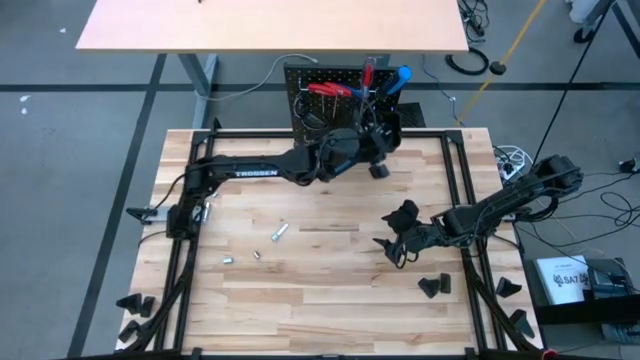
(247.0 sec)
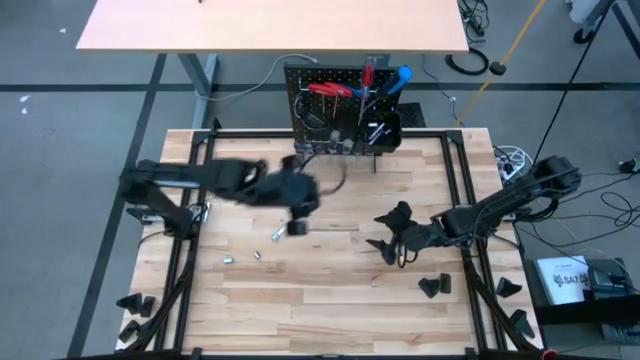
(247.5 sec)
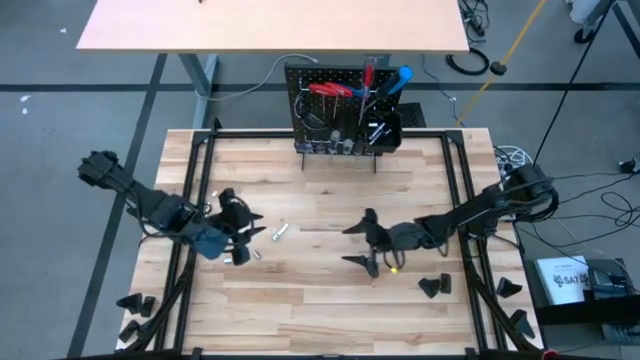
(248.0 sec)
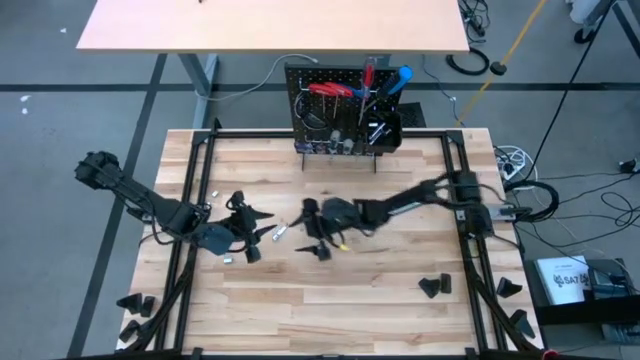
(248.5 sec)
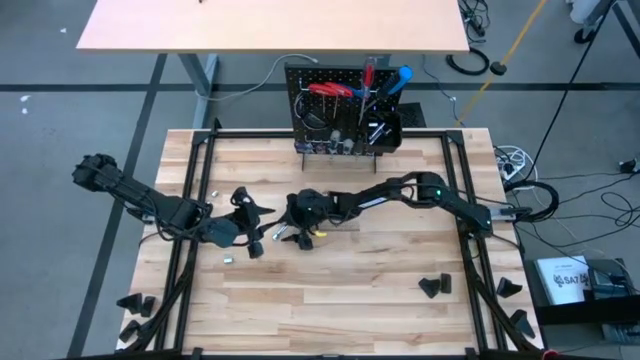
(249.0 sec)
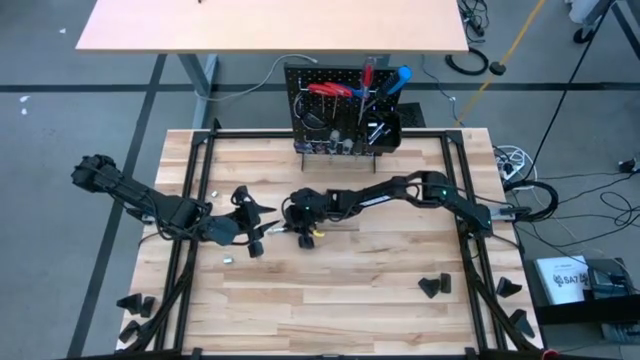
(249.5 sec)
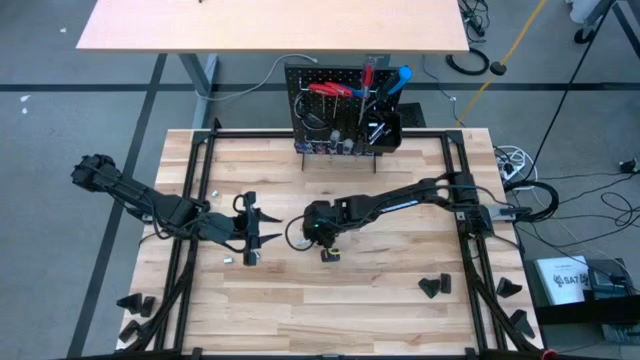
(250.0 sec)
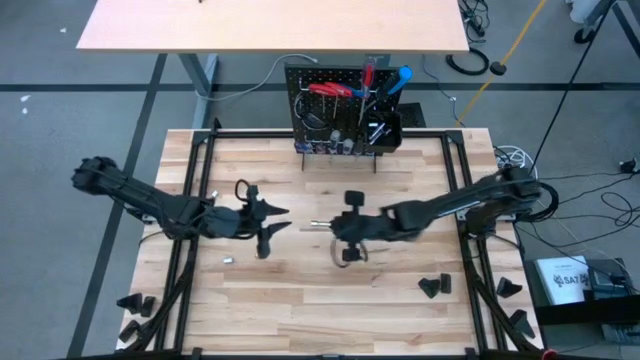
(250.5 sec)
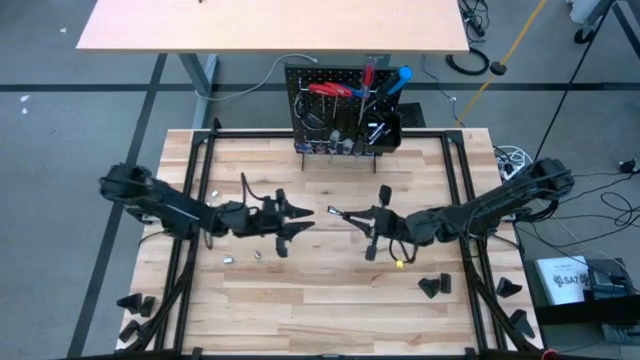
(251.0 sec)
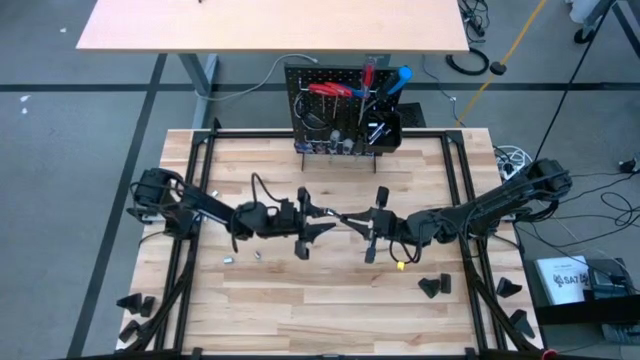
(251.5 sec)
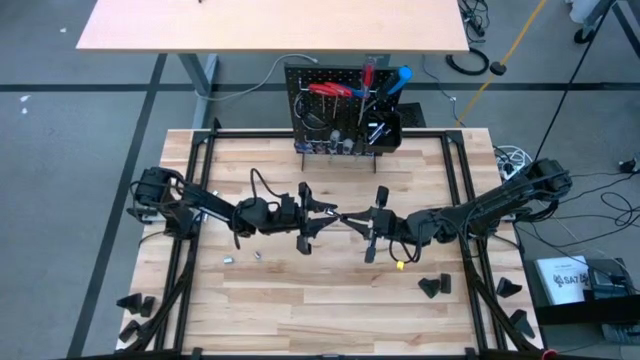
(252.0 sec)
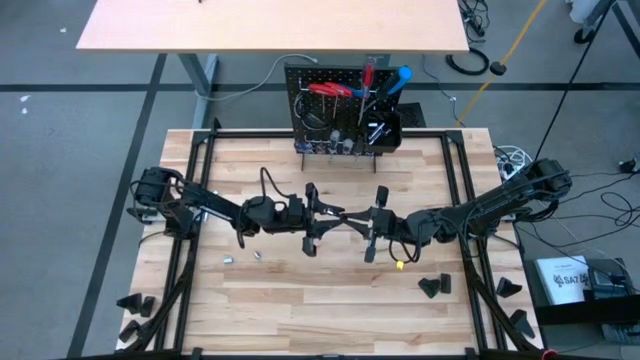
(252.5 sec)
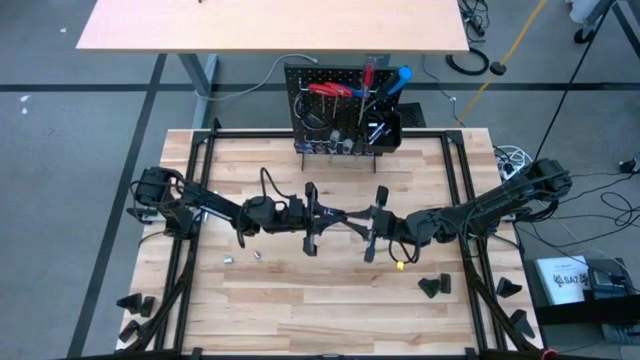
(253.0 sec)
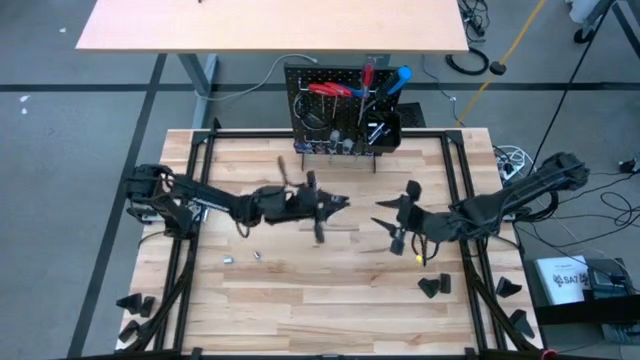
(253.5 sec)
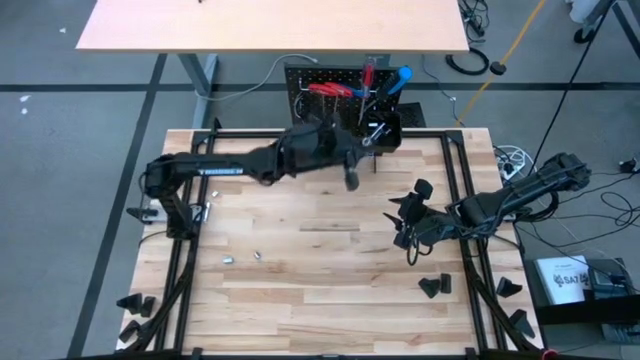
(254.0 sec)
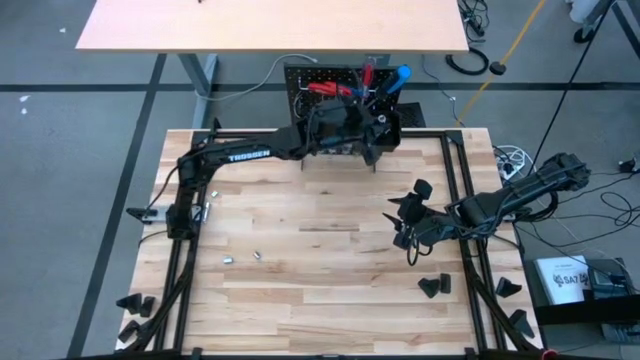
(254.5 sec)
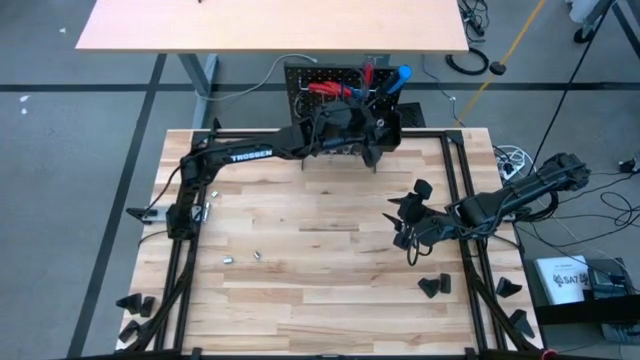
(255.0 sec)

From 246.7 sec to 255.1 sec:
Task: Hang tools onto peg board
Put the silver extension bar into the black bin on the peg board

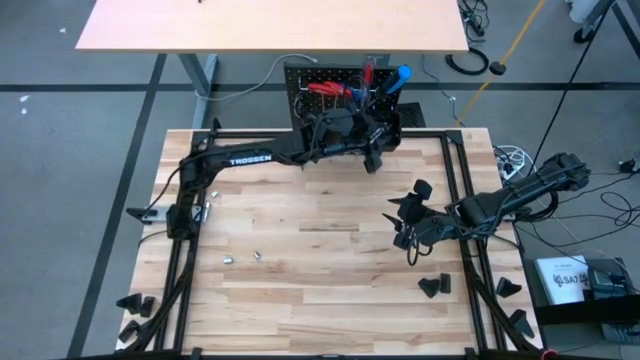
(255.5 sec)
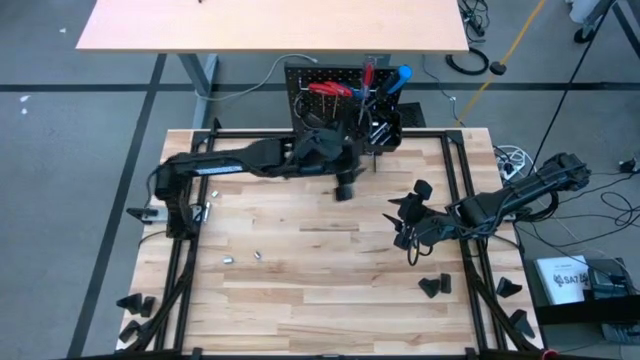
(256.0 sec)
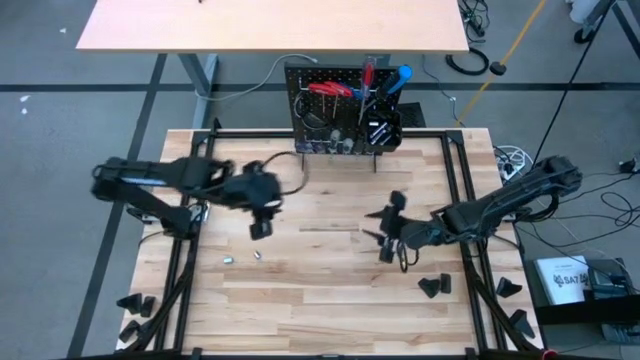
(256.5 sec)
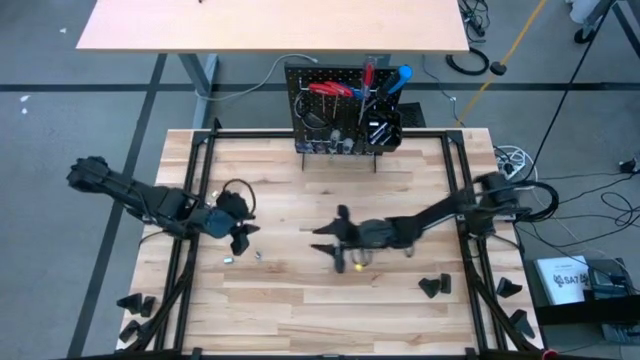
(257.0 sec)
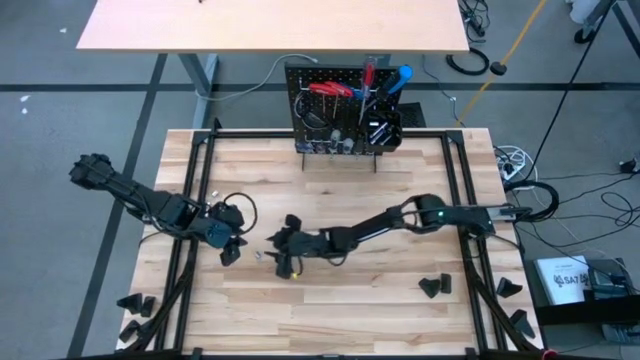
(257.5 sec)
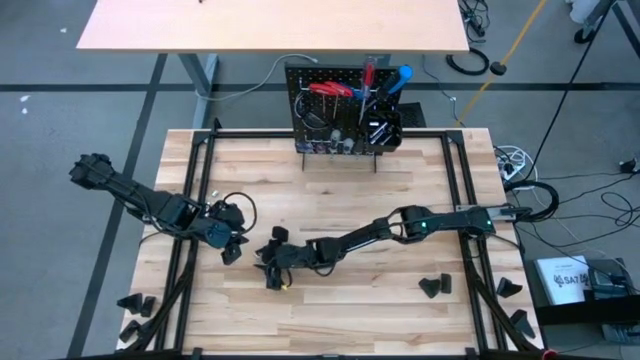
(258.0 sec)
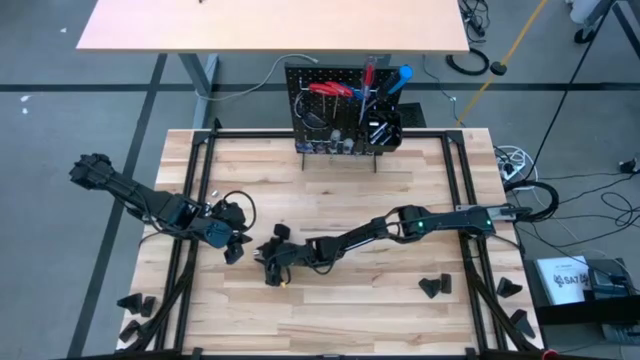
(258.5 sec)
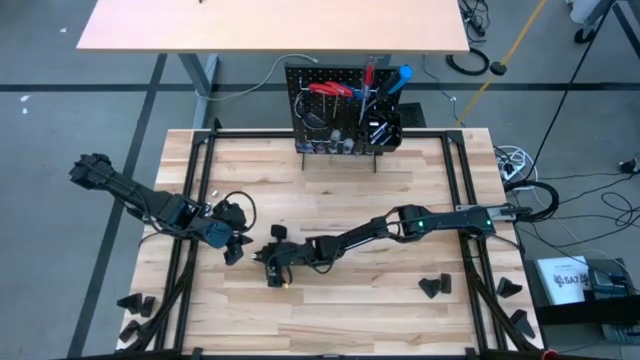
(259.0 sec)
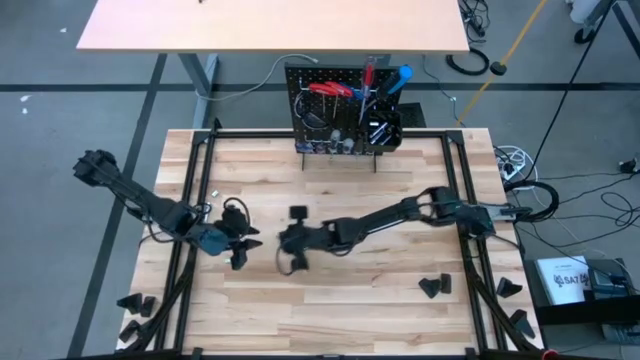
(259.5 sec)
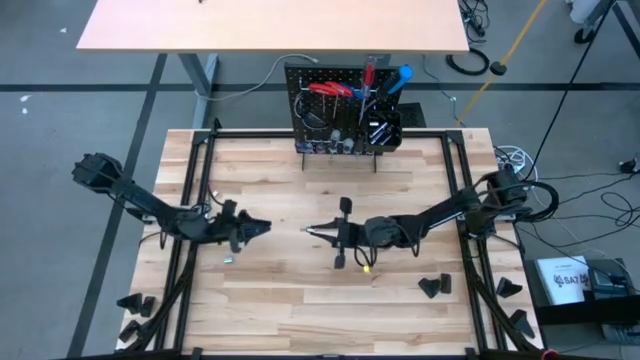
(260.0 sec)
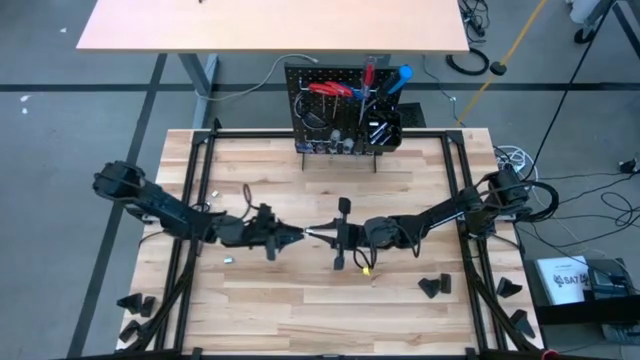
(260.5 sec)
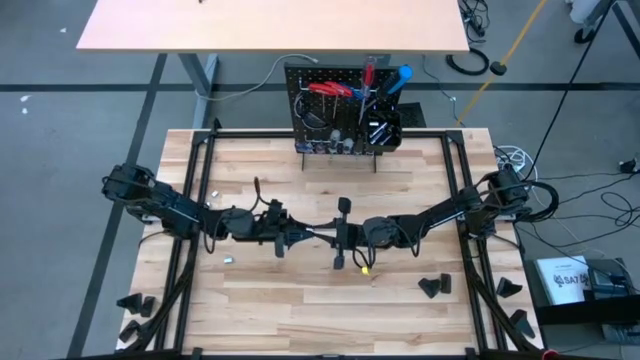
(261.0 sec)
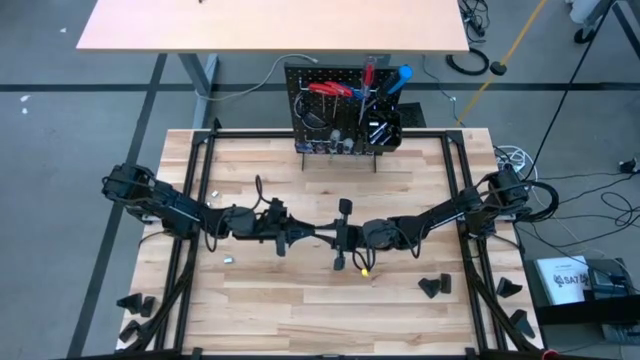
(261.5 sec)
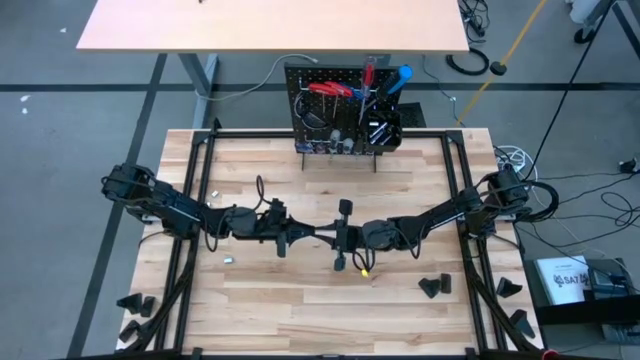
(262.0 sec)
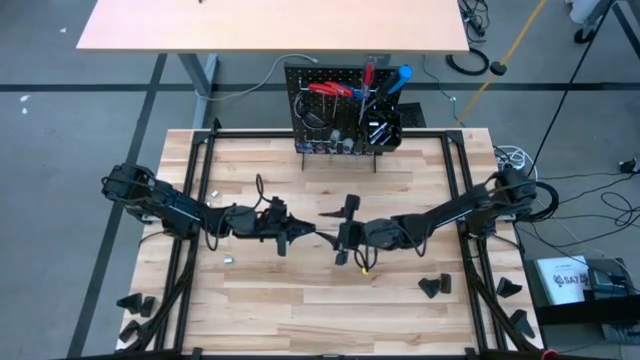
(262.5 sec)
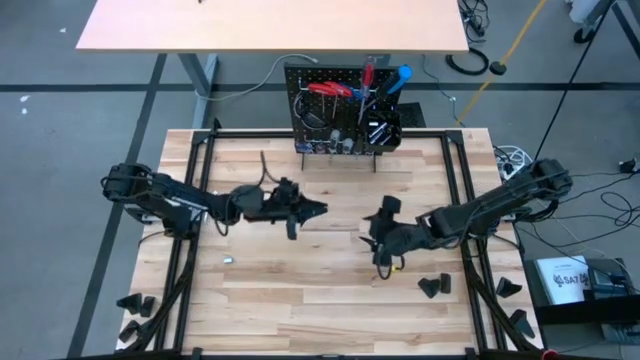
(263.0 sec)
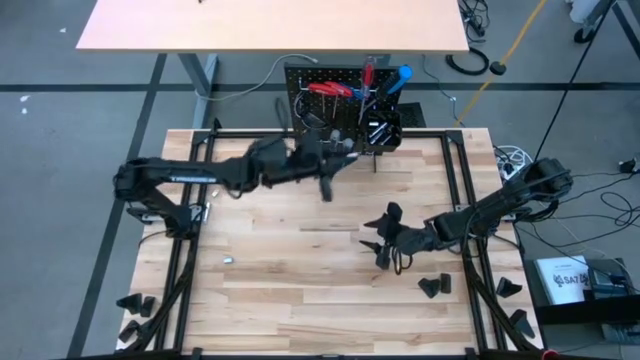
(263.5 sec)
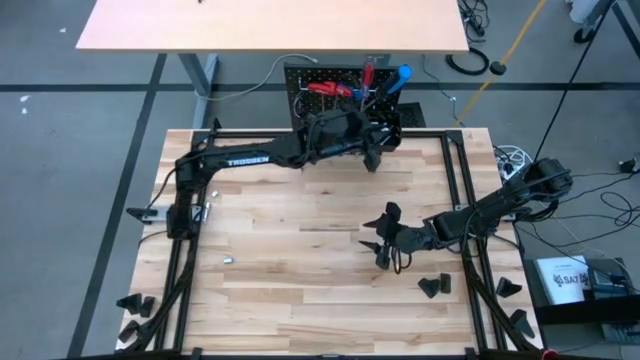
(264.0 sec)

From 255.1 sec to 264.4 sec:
Put the silver socket into the black bin on the peg board

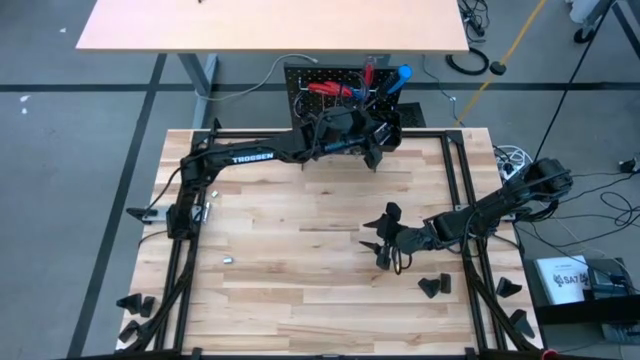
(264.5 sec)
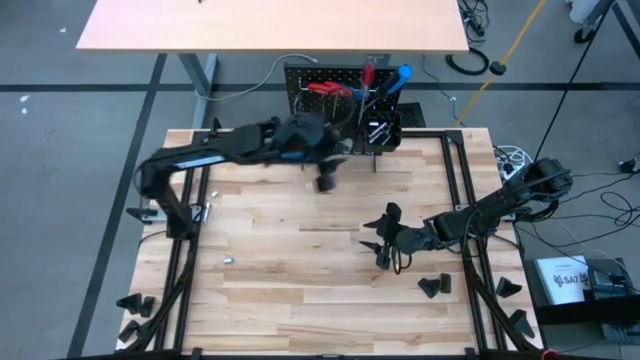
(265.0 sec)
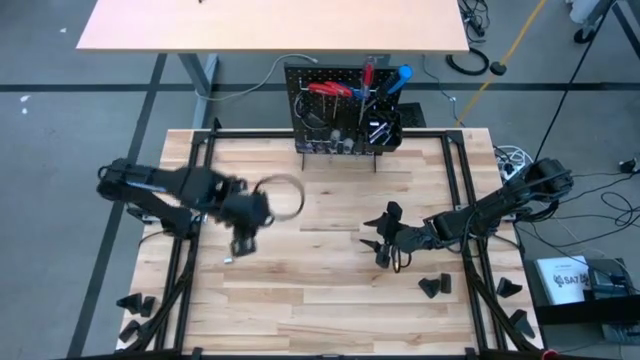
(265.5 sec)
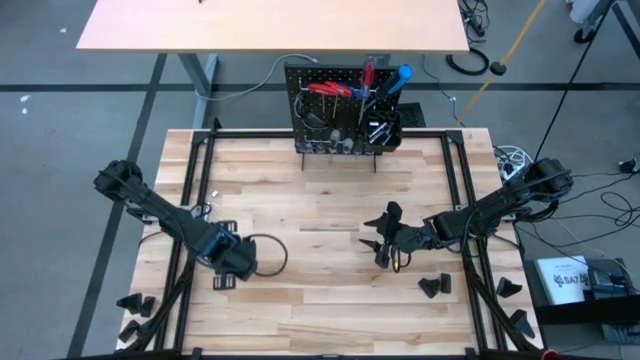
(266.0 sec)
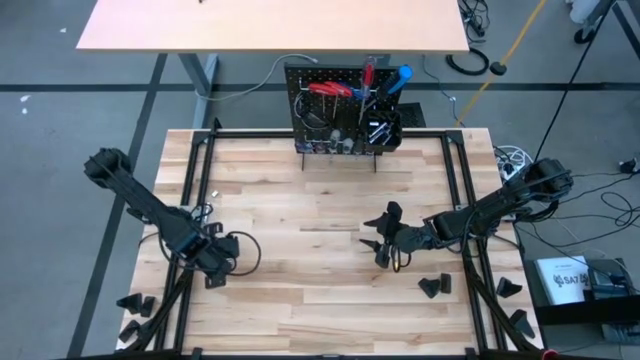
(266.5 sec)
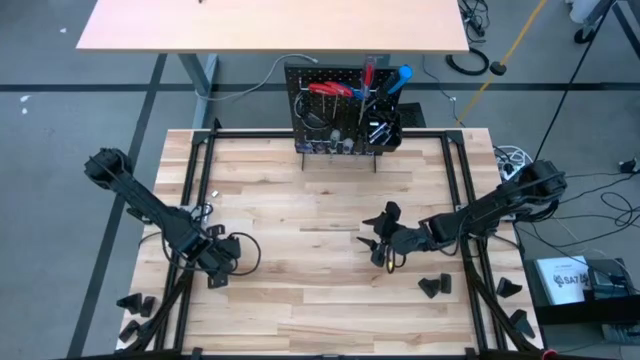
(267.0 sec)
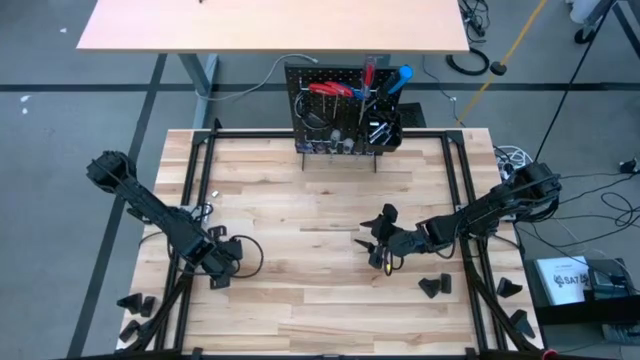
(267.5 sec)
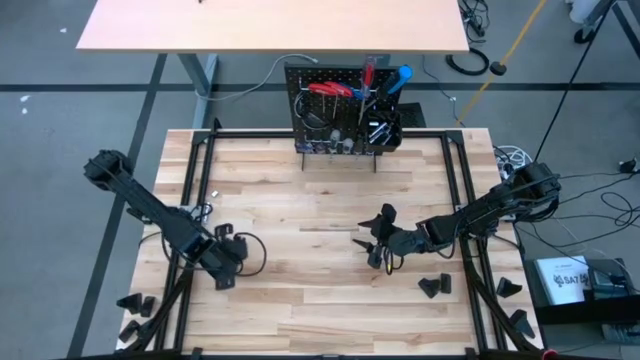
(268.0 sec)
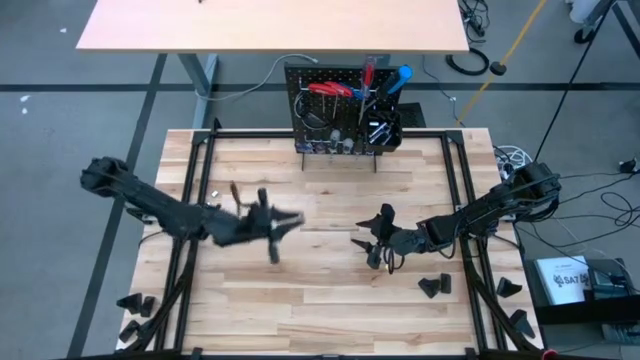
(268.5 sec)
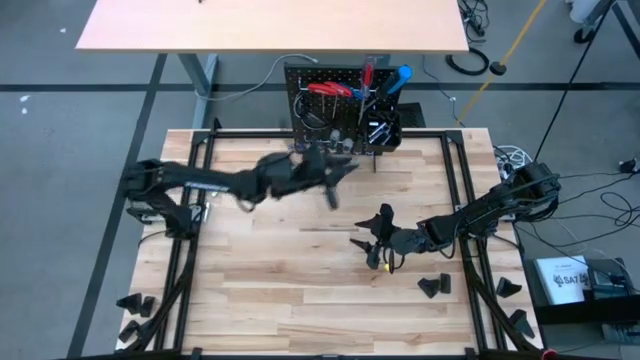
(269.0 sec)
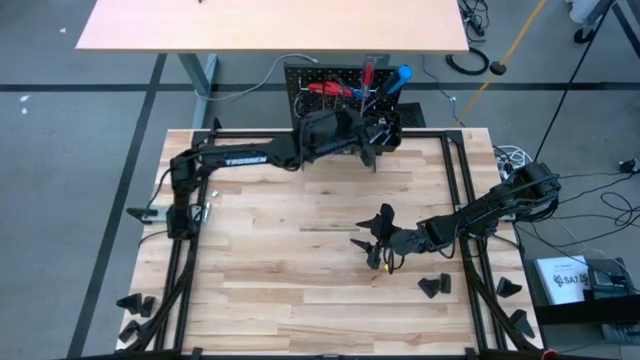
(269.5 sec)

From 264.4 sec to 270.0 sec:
Put the silver socket into the black bin on the peg board
